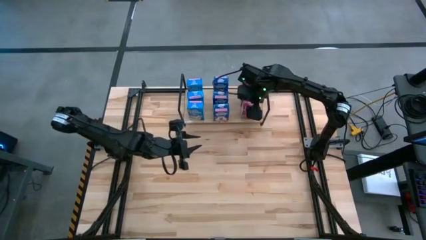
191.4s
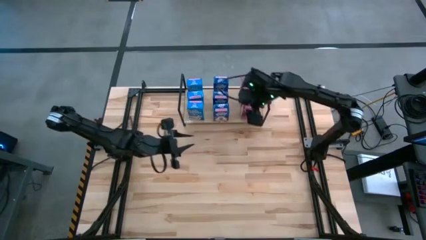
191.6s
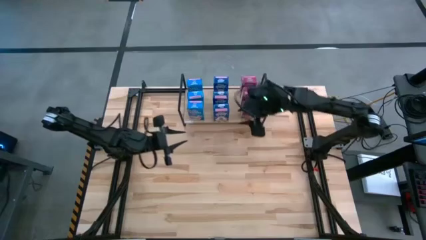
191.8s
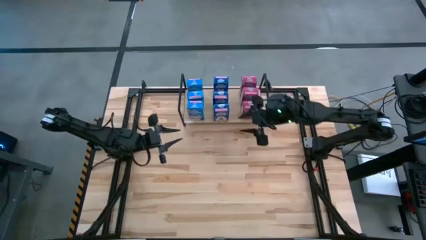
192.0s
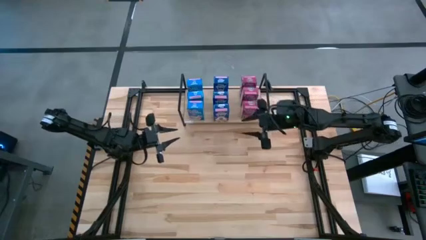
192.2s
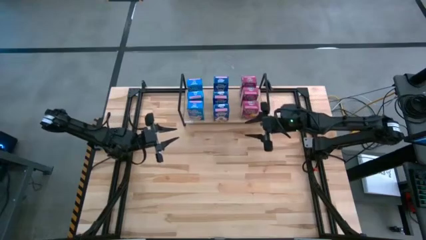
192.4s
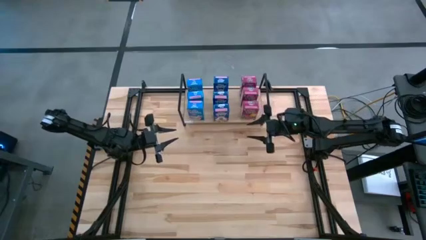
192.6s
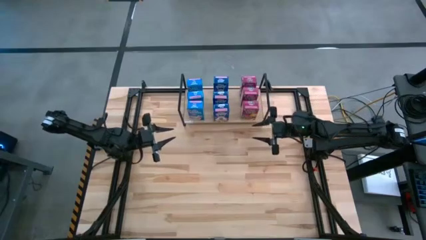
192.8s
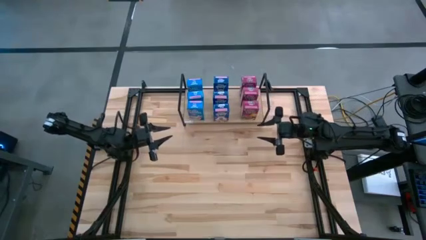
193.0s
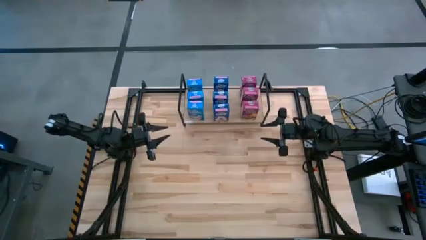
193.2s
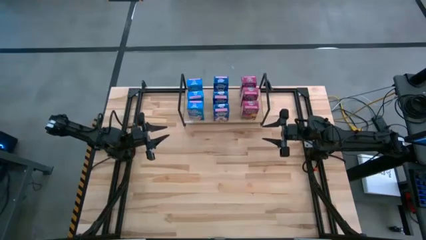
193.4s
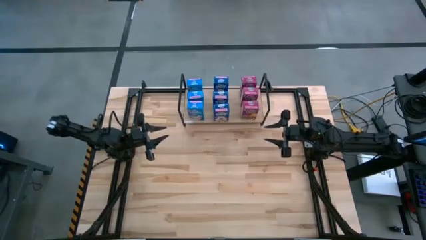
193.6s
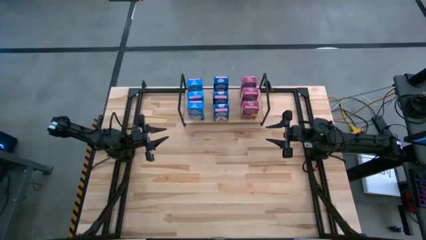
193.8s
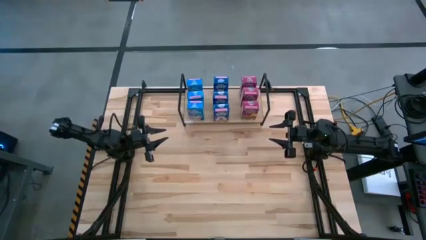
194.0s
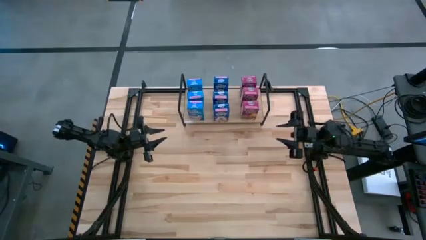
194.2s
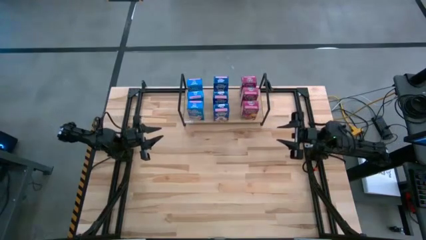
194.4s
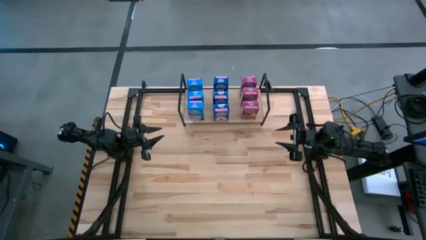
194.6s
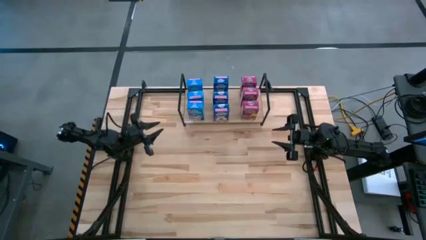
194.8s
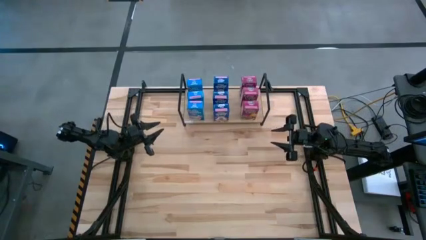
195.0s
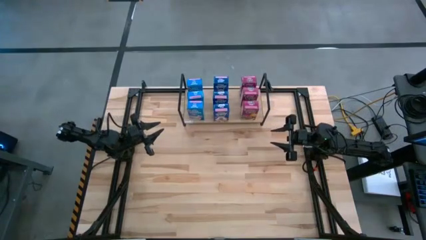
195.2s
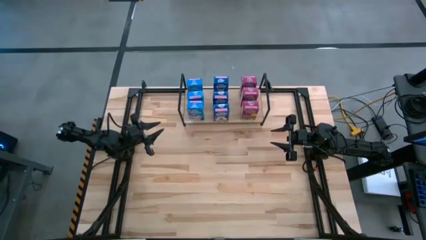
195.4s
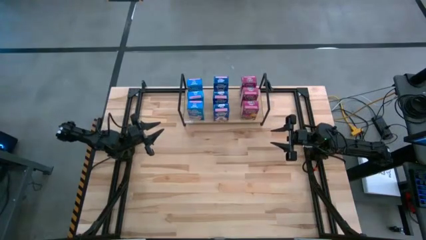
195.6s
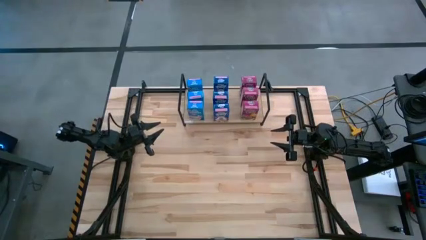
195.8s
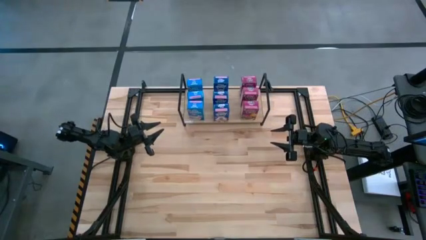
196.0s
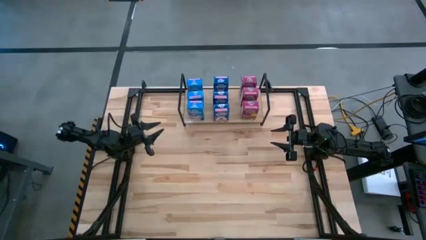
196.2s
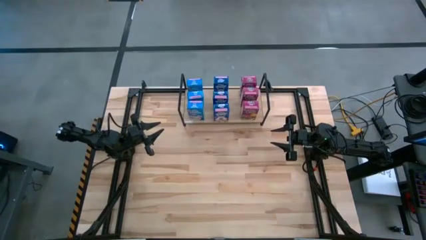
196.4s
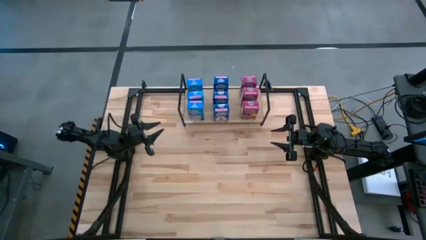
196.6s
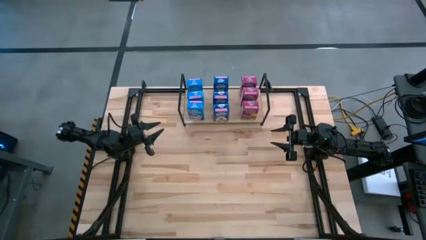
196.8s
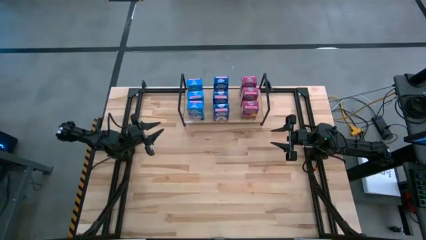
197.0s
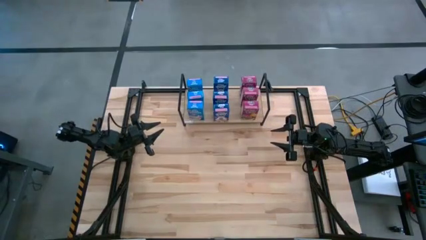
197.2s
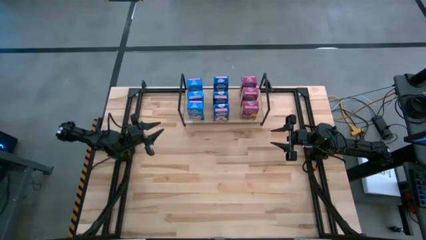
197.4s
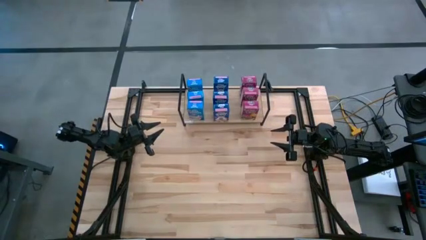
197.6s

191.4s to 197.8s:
Task: Stack cereal on shelf
Return to Home Position

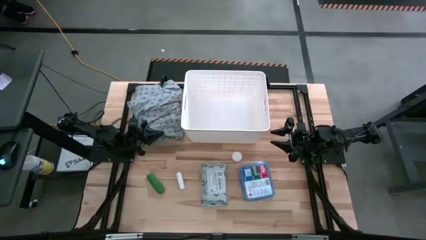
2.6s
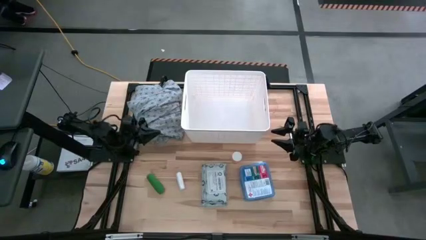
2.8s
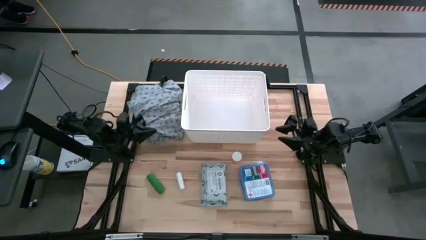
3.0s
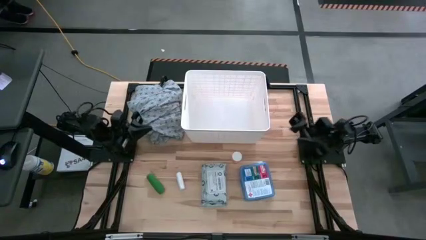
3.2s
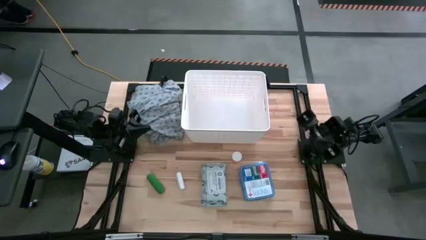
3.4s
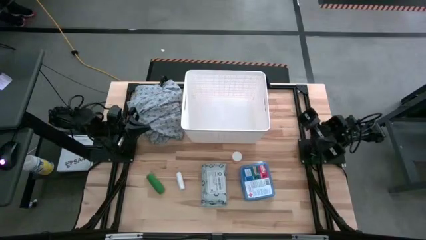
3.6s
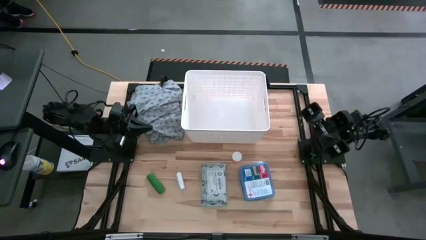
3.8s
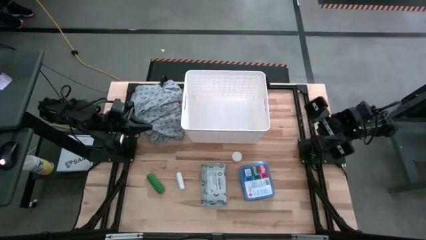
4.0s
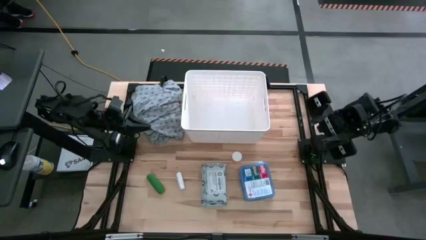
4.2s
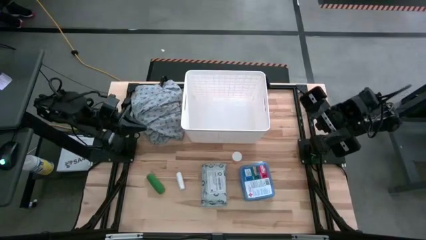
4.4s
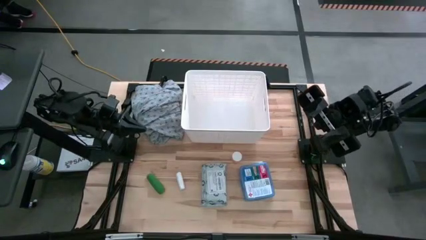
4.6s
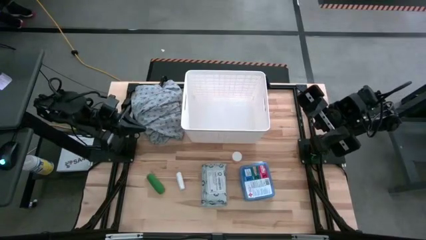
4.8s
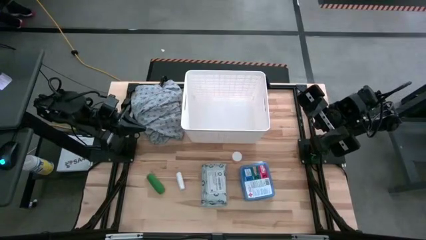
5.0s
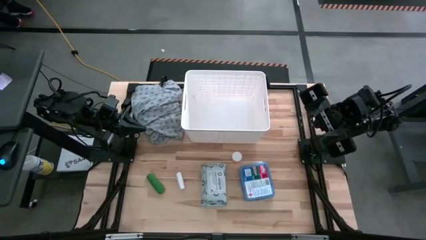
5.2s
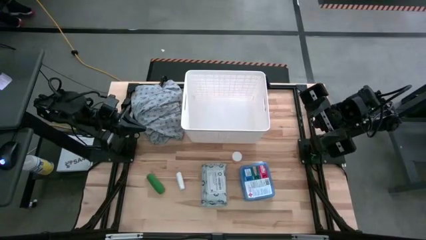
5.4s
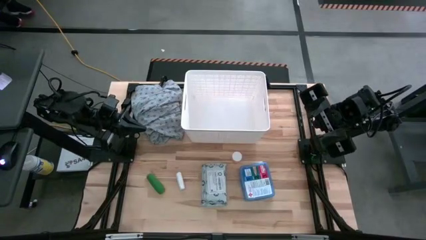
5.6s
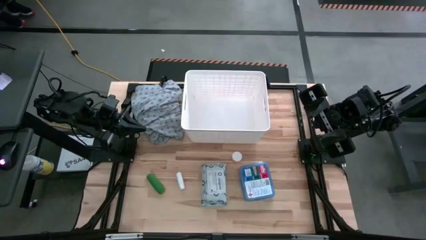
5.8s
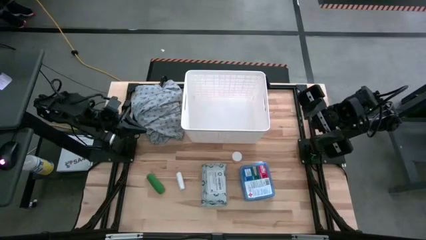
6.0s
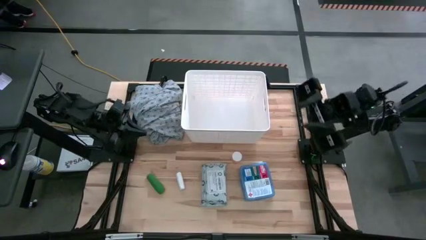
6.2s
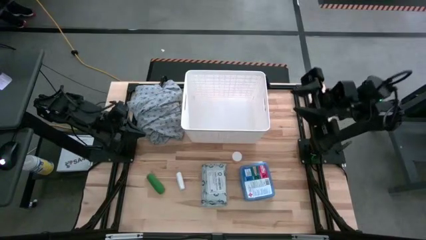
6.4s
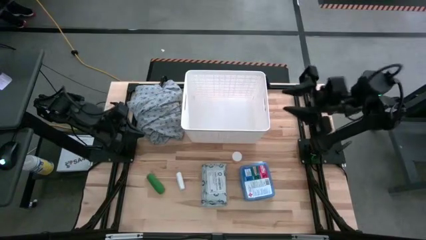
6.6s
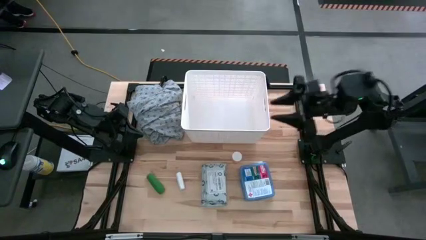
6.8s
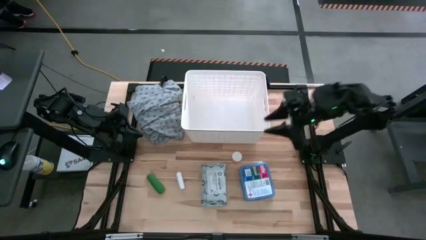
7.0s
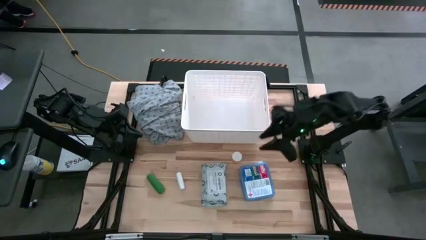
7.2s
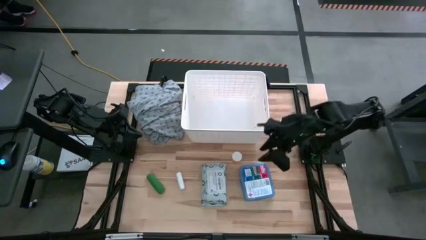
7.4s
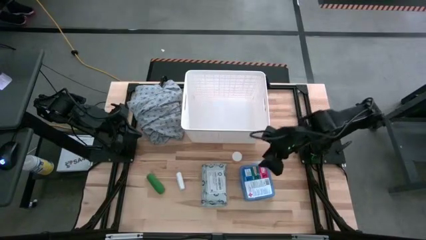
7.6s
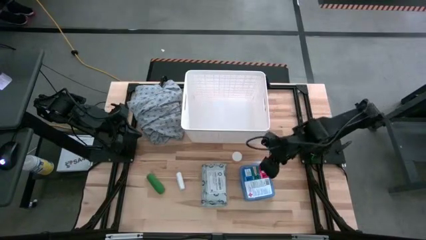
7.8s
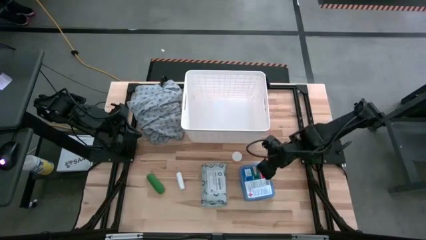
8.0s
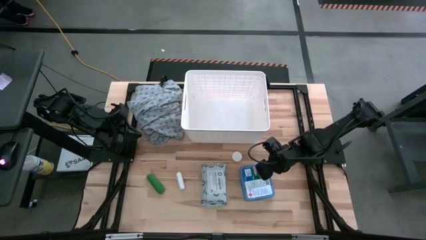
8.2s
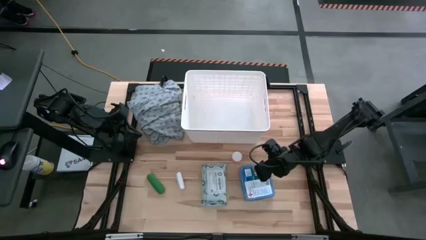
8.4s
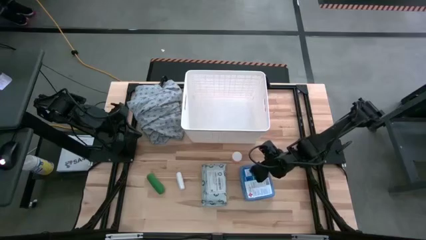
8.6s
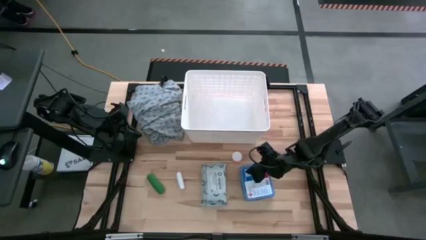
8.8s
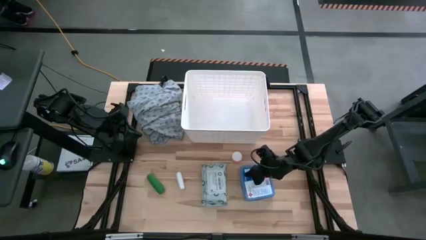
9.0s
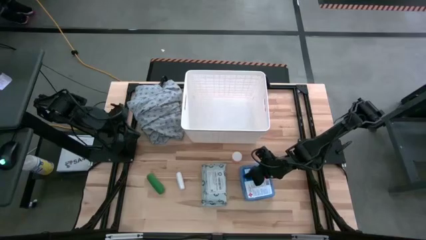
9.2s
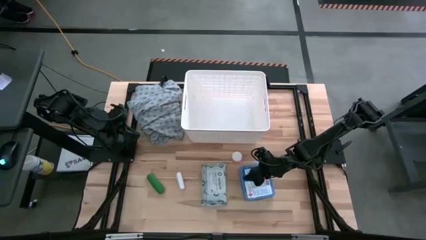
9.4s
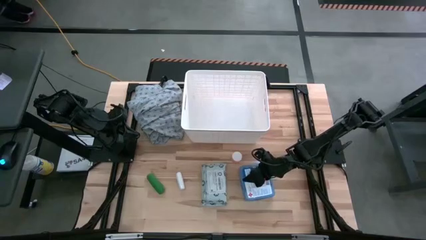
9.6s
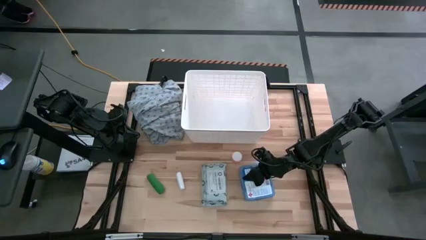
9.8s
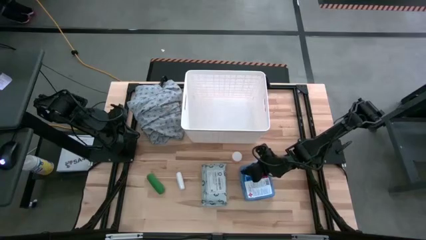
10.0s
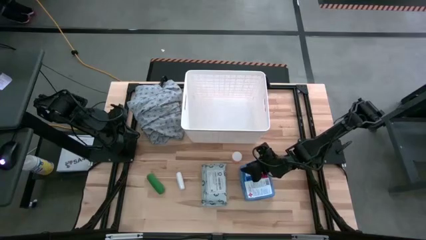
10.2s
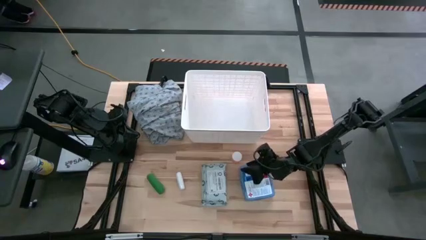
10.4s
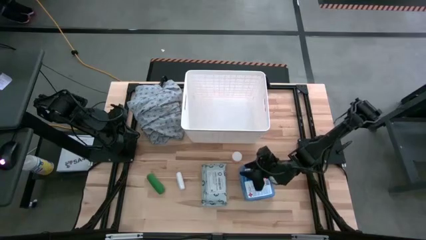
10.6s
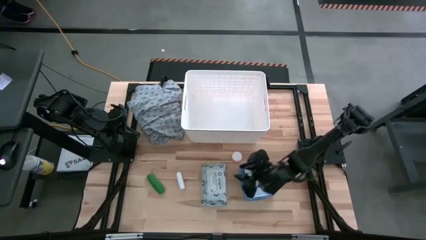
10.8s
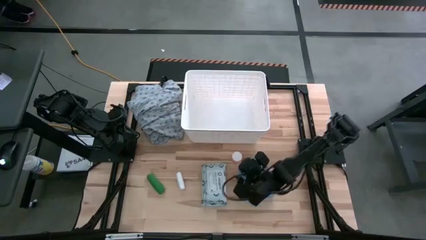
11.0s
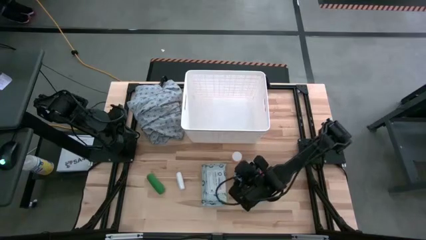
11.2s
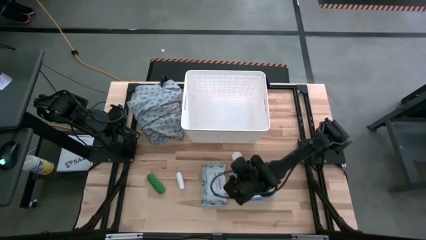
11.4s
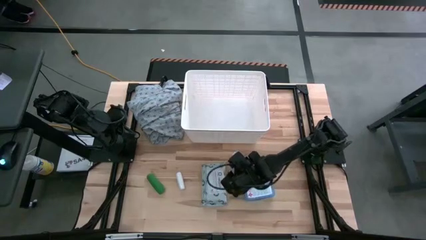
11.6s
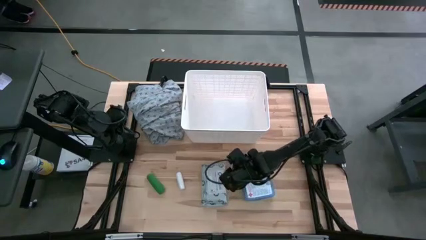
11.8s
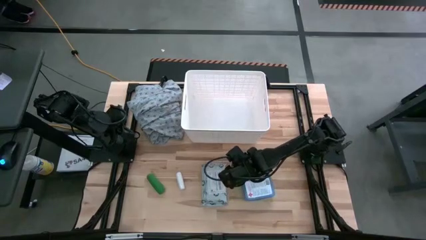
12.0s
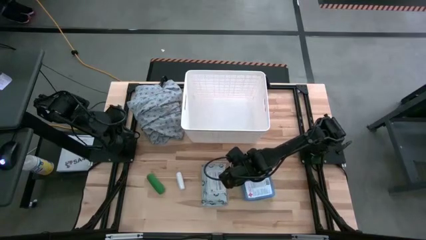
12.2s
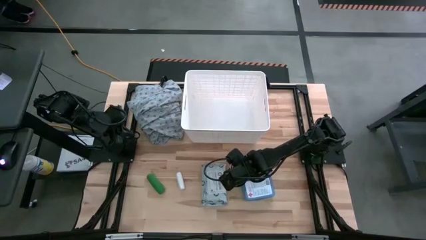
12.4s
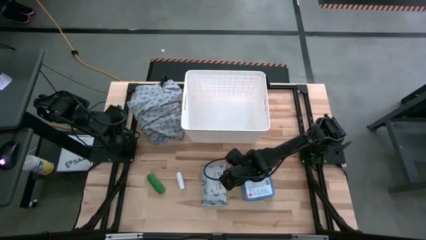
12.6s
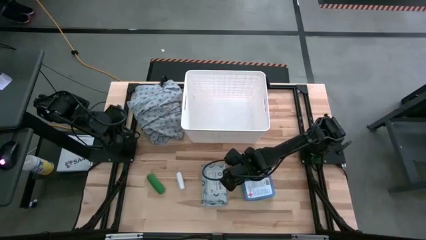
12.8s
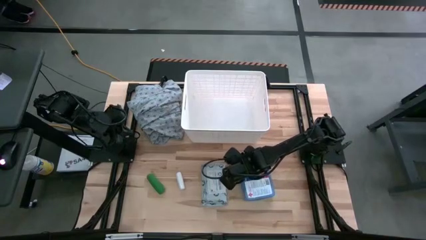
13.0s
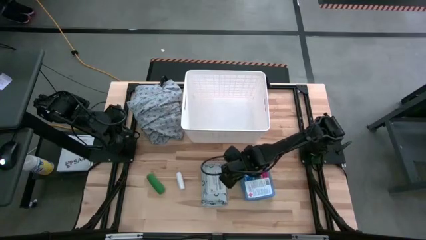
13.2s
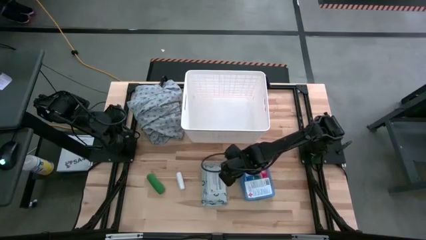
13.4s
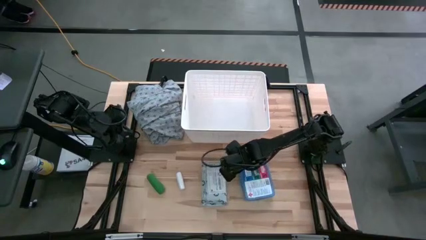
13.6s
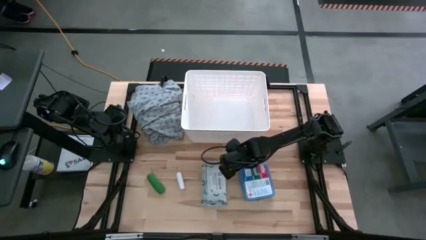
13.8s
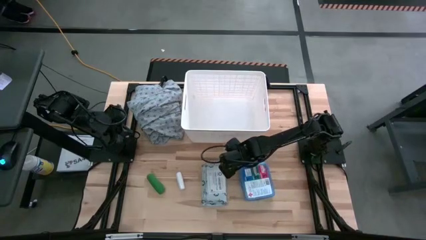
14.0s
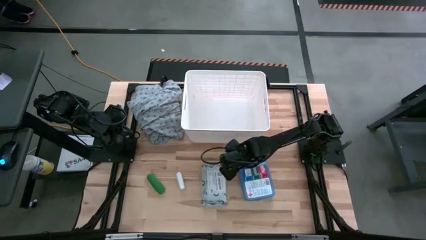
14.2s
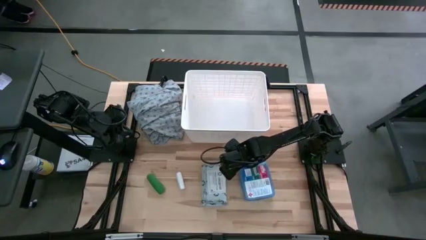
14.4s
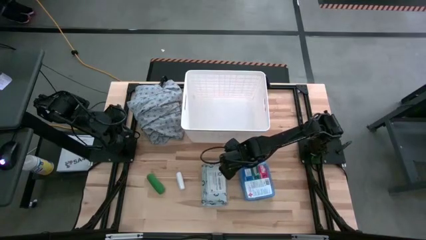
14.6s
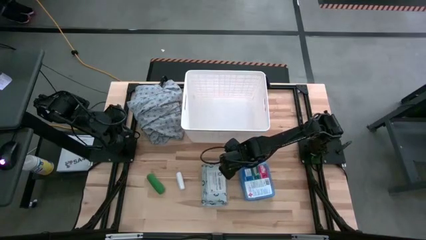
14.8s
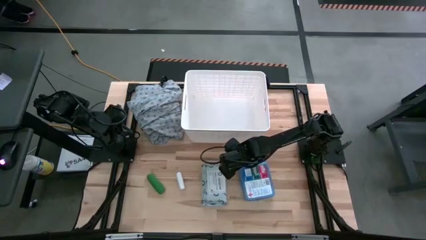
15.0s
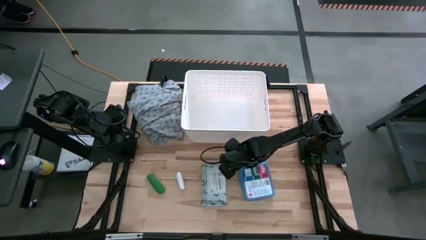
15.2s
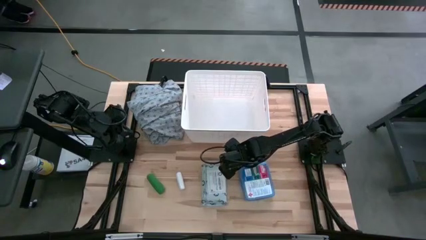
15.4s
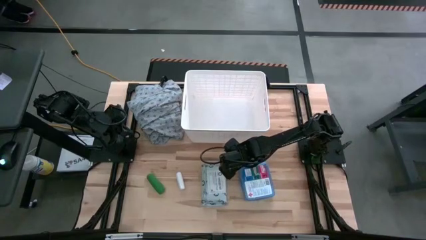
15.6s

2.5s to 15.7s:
Task: Pick & place medical supplies in basket/bin
Put the orange pill bottle in the white bin
